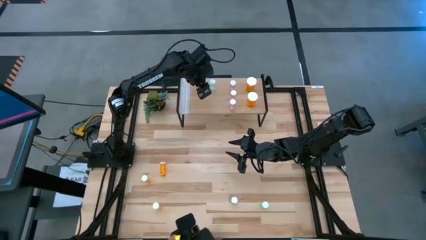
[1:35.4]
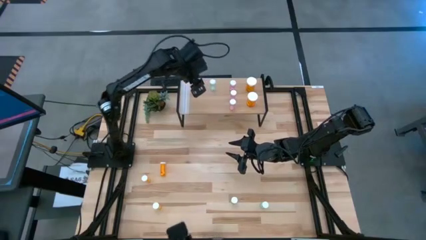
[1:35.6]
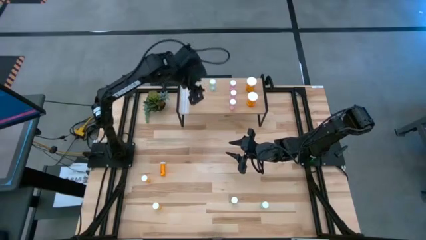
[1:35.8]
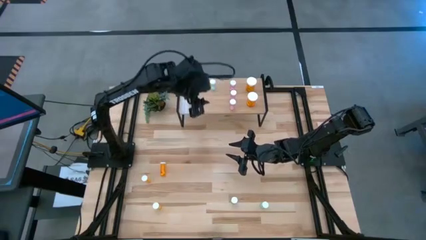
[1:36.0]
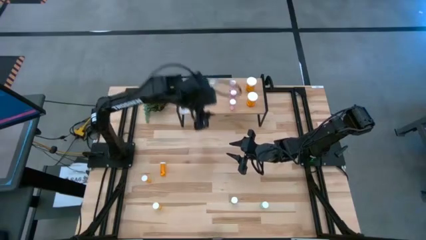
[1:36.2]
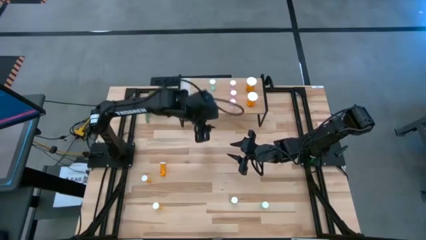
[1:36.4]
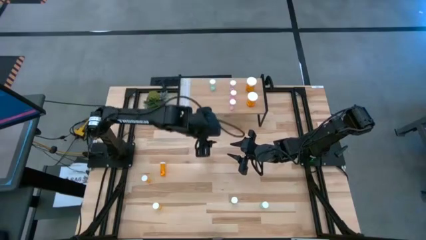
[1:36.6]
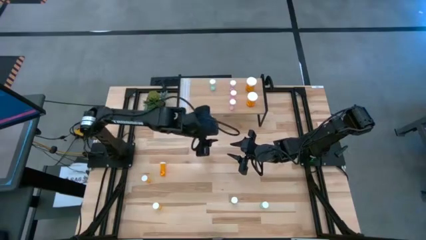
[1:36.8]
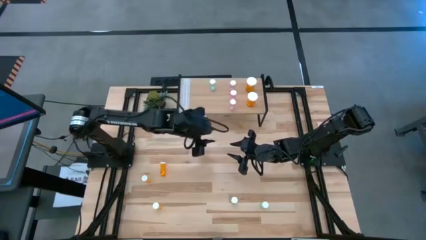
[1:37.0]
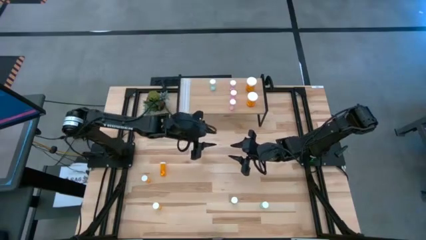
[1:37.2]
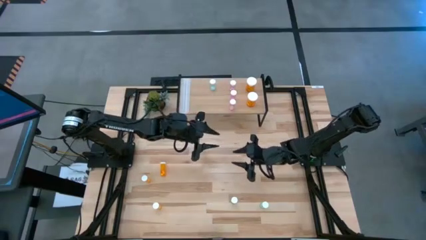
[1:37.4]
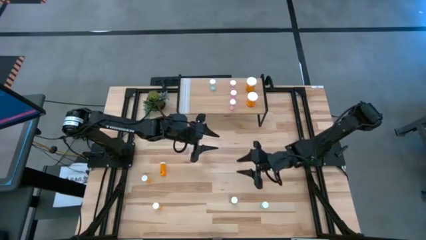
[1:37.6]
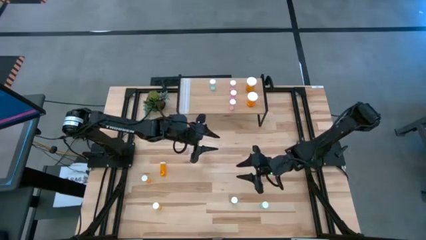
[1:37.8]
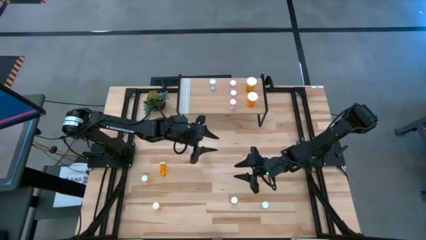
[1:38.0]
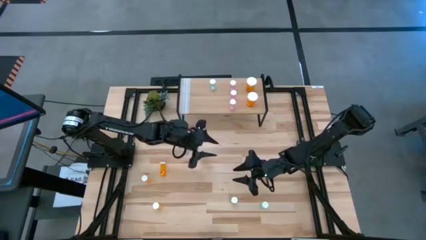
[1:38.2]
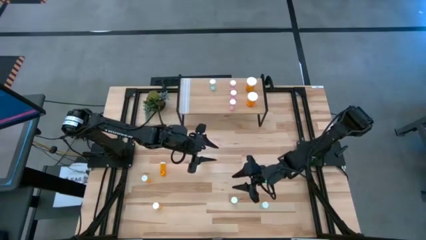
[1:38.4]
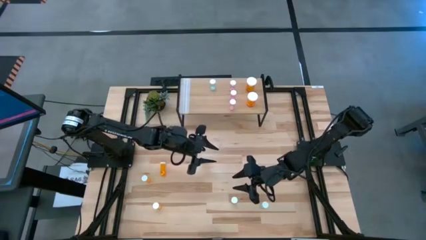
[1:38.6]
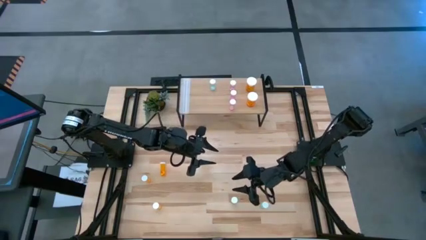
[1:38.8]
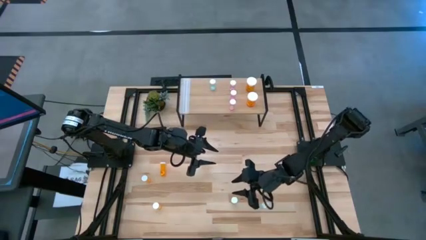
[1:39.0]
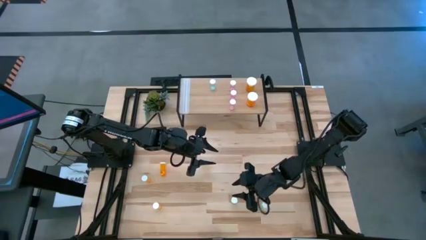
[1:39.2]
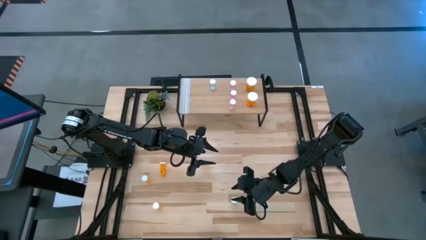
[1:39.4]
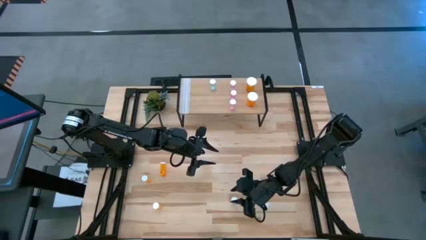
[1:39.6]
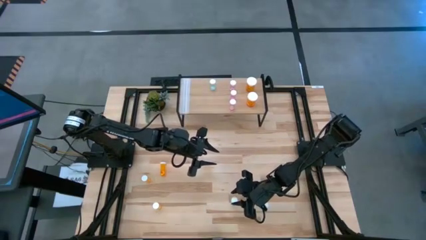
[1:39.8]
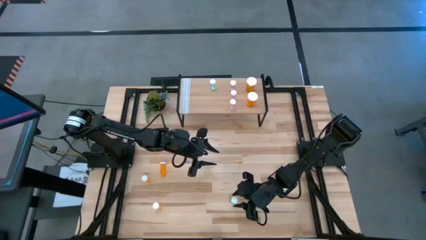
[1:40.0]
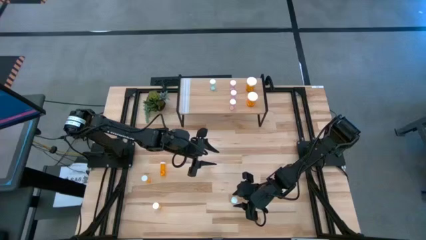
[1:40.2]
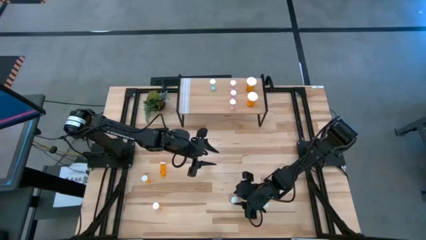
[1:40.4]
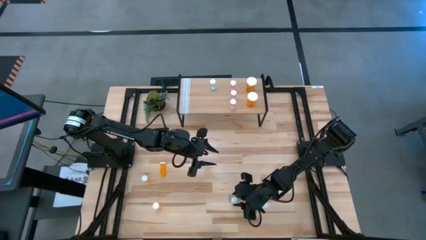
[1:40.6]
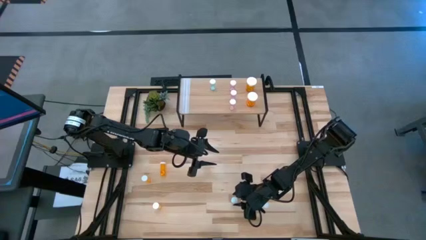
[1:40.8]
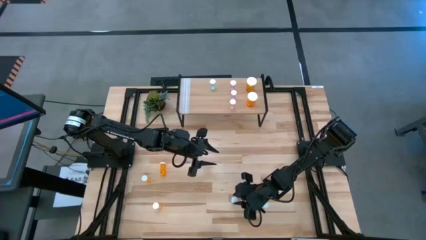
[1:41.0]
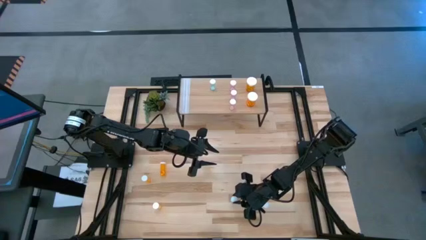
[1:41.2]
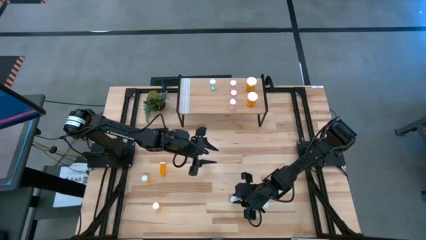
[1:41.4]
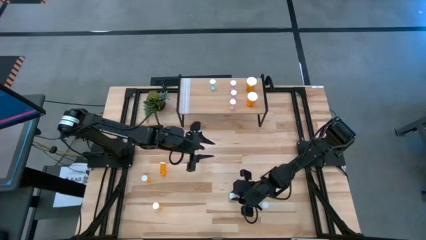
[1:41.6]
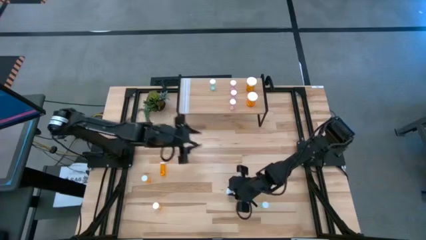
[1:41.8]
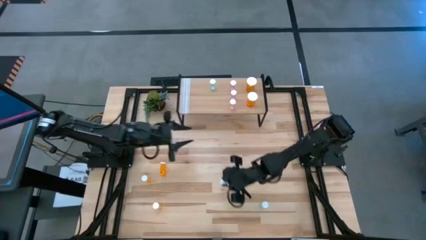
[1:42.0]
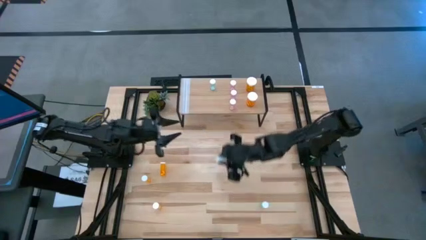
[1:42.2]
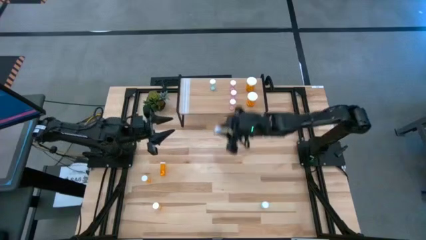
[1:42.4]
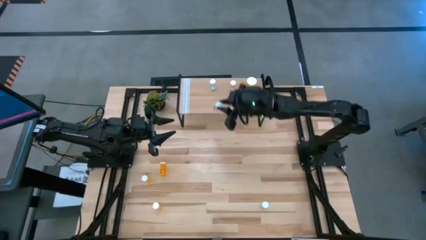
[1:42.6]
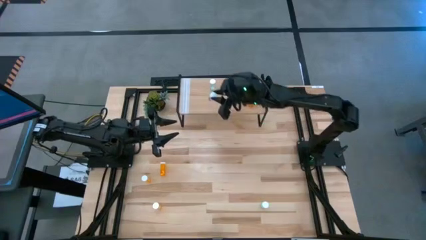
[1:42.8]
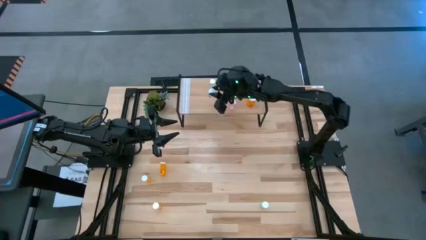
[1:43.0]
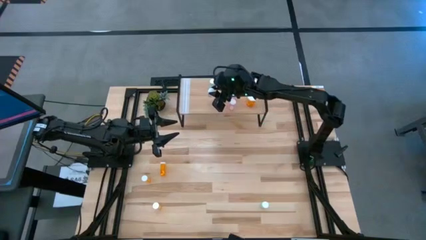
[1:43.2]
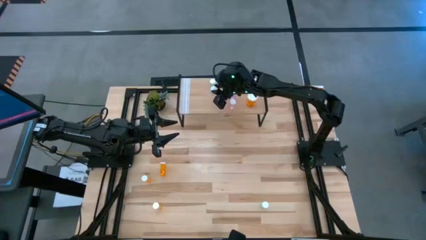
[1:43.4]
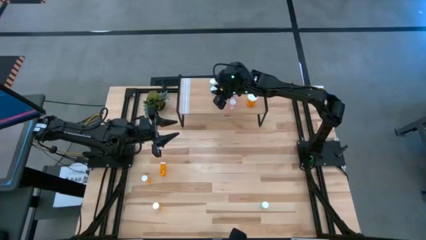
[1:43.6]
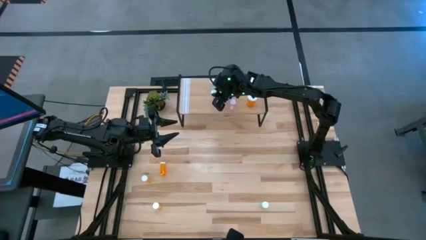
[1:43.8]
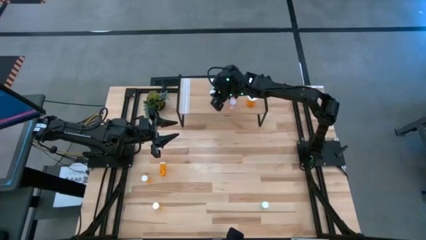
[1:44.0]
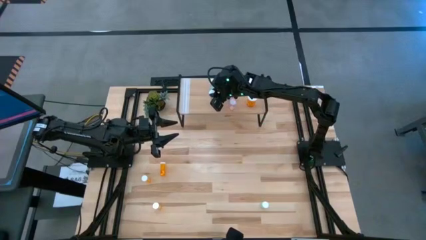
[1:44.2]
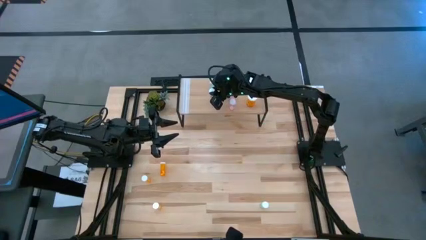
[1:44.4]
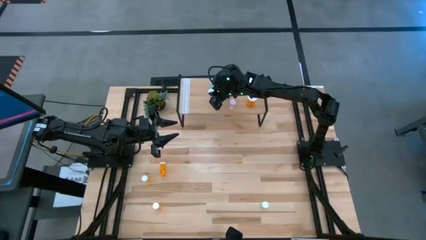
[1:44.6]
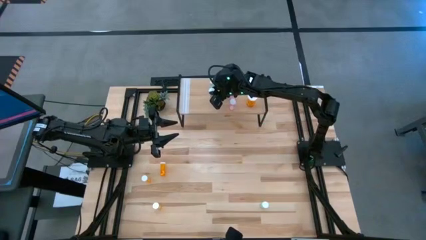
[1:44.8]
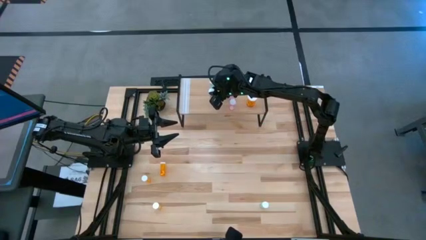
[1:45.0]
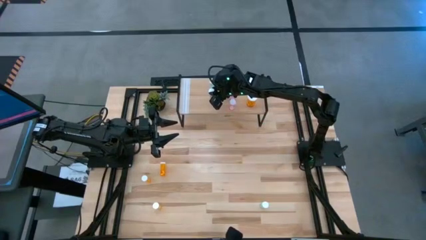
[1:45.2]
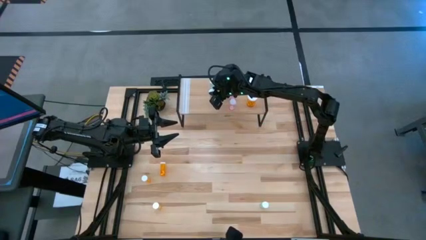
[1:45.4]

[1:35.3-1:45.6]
Task: Pick and place medicine bottles onto shelf by color
Put the left green pill bottle on the shelf aligned with the other green pill bottle
